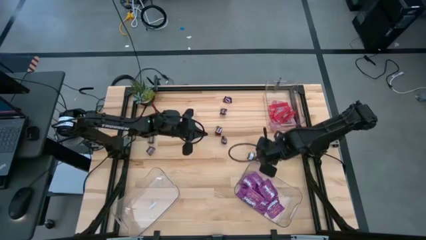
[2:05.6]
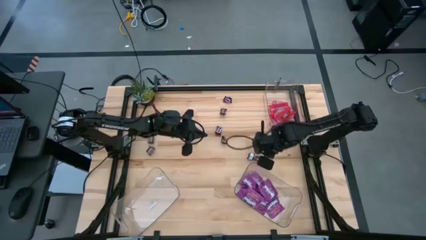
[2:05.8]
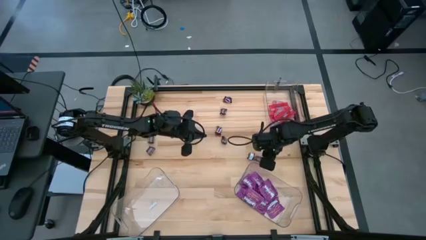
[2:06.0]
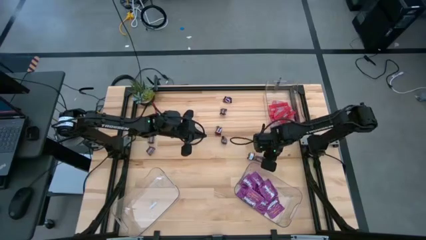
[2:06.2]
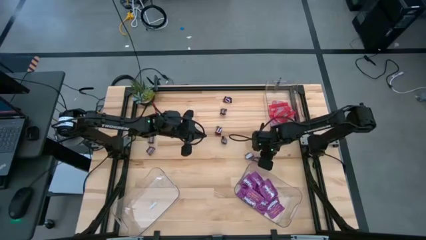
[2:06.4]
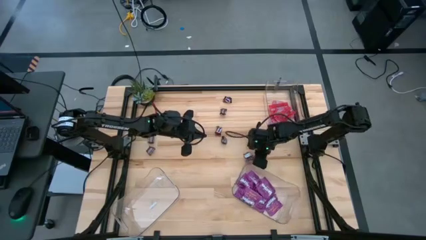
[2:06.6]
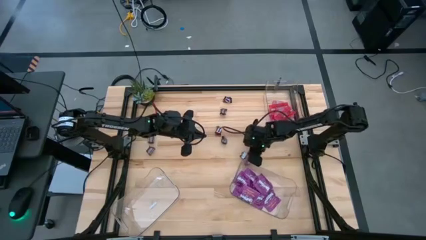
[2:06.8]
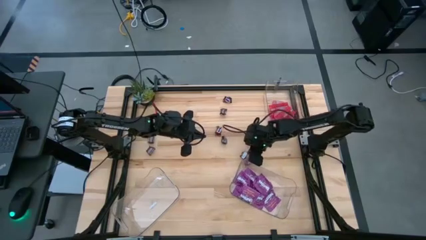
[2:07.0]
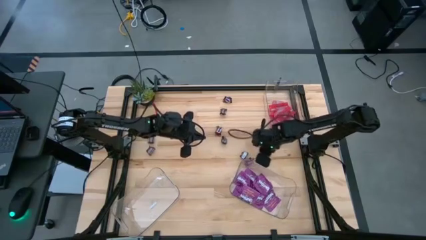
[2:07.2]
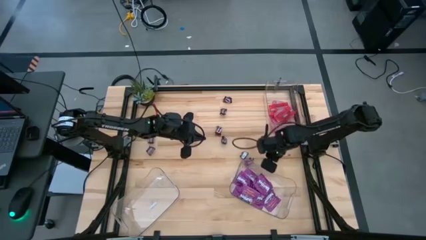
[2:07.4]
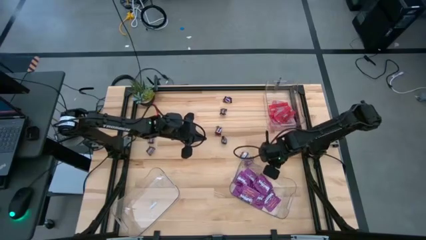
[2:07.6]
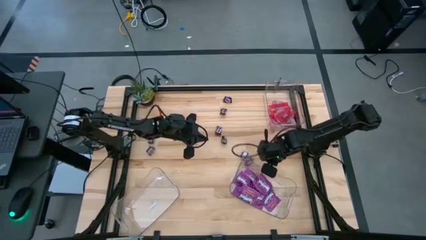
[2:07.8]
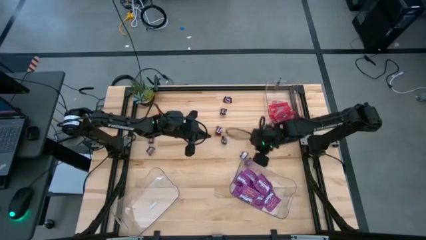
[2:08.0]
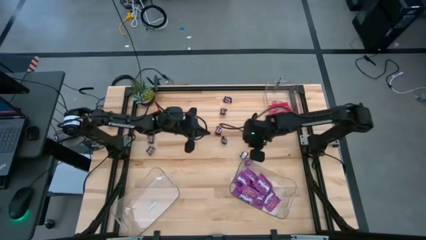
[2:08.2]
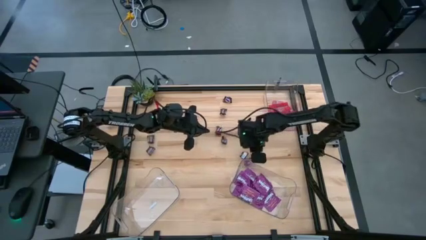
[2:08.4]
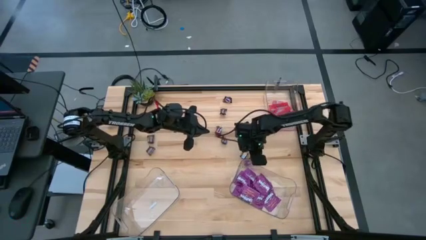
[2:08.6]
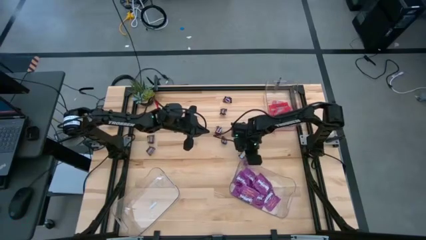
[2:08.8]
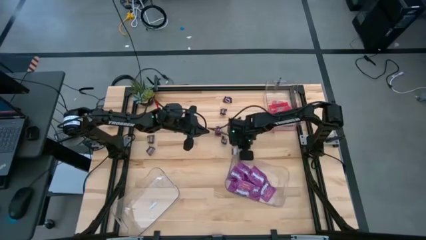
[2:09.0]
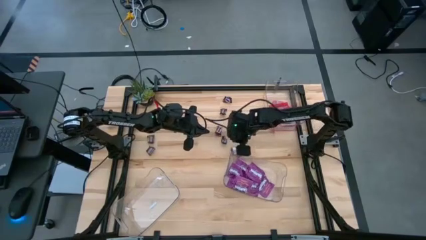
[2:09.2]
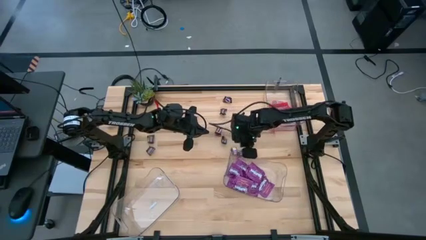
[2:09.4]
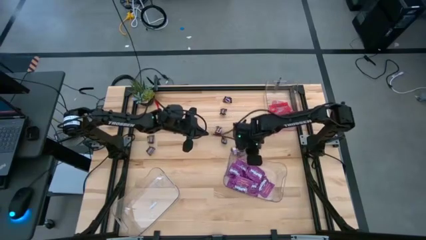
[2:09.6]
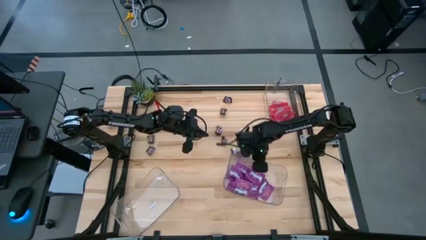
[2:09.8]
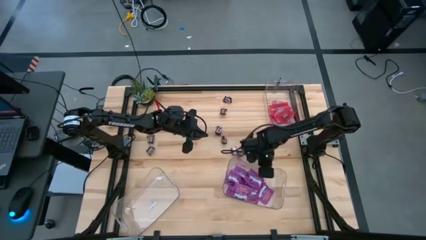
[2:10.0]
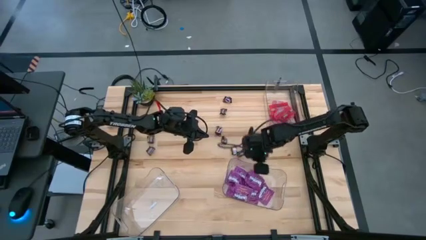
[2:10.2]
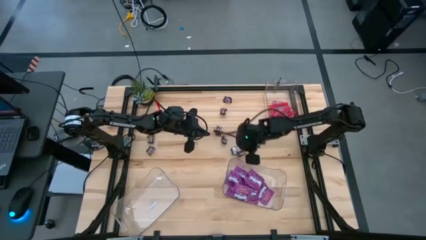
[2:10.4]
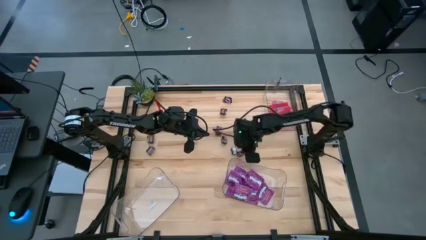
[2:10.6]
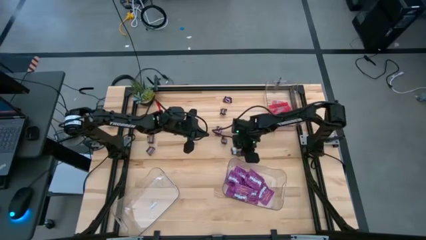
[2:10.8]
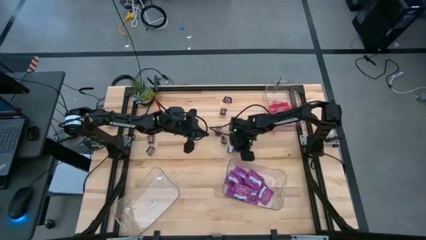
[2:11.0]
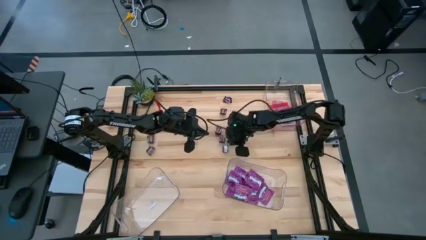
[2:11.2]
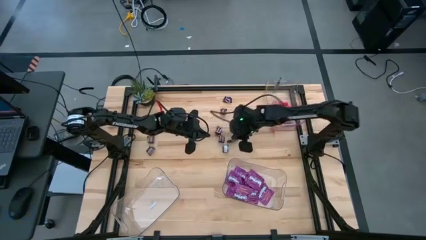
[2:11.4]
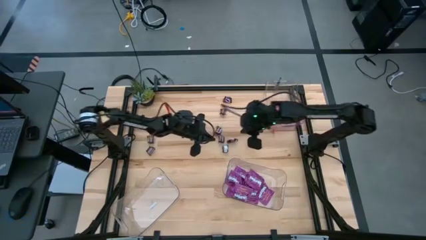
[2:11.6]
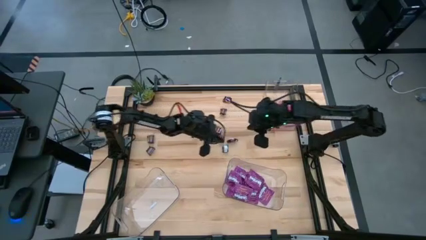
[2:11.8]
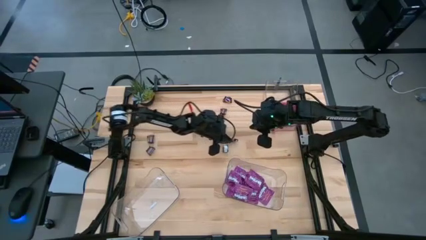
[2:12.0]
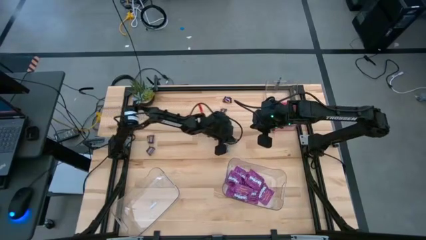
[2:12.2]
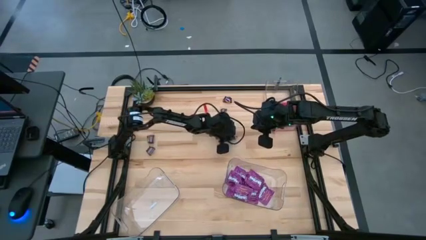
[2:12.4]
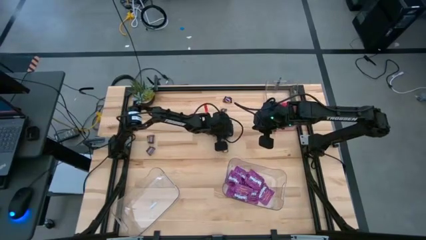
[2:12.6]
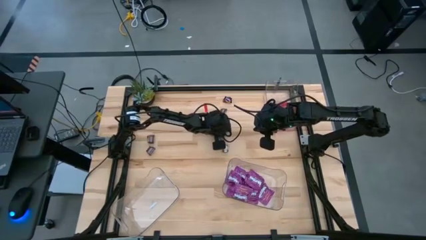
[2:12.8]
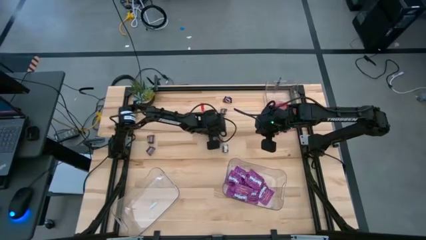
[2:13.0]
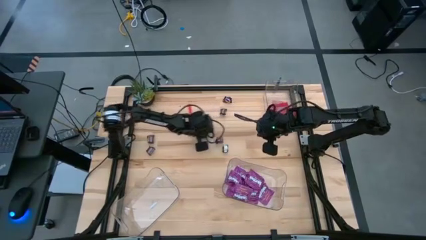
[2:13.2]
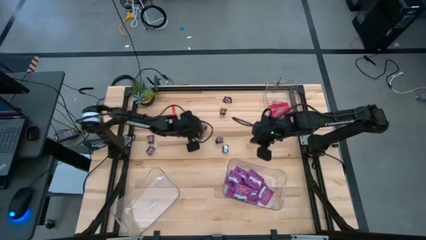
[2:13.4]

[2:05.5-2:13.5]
Task: Sort candy
Move the brown candies closer to the center

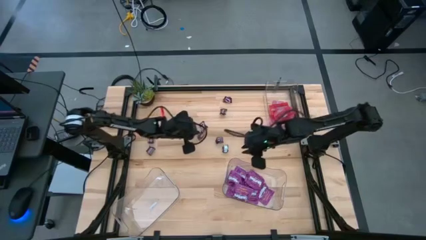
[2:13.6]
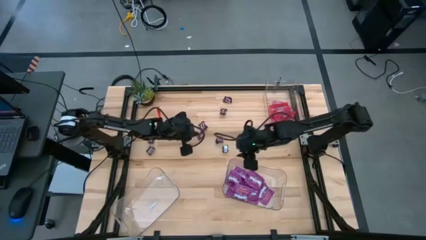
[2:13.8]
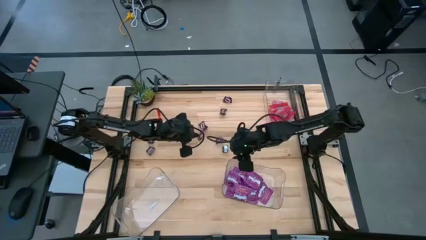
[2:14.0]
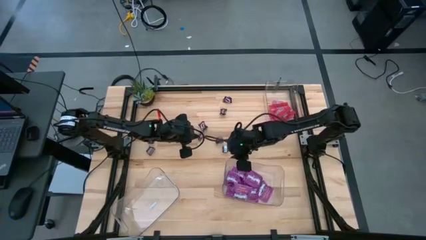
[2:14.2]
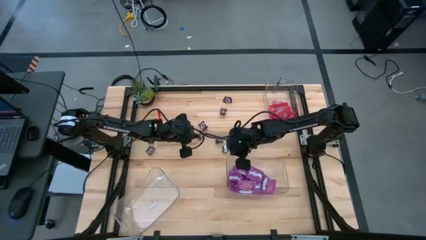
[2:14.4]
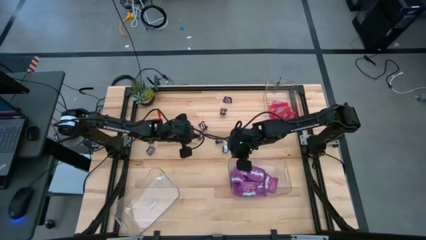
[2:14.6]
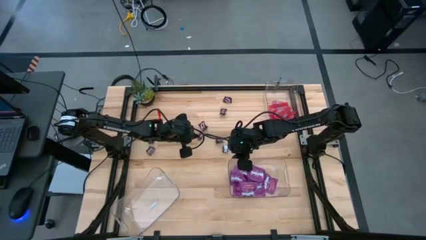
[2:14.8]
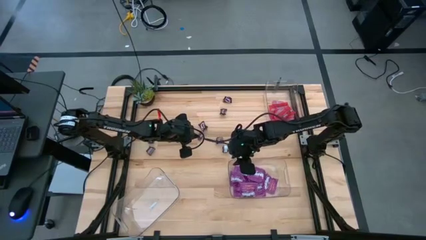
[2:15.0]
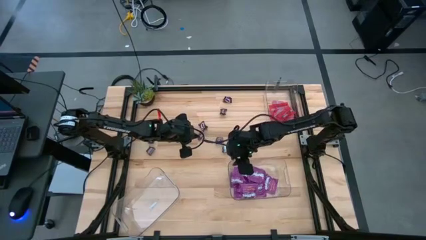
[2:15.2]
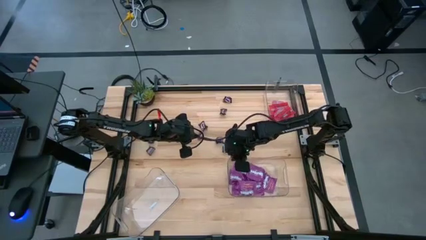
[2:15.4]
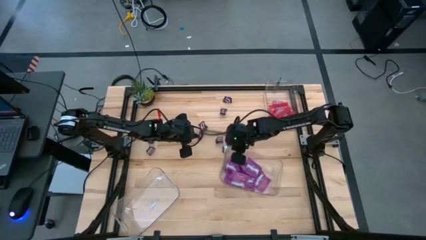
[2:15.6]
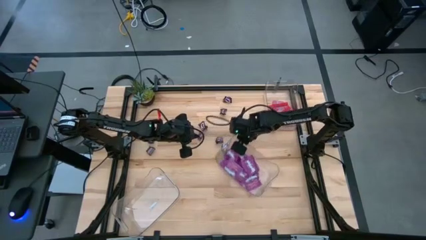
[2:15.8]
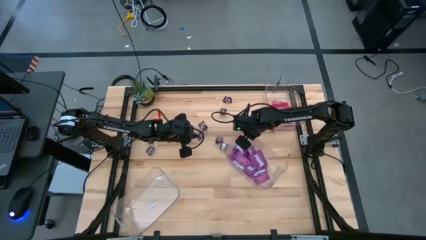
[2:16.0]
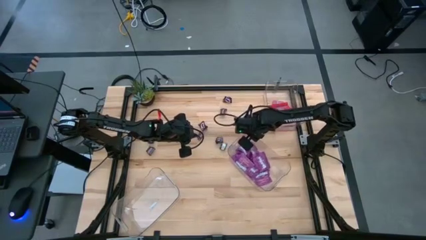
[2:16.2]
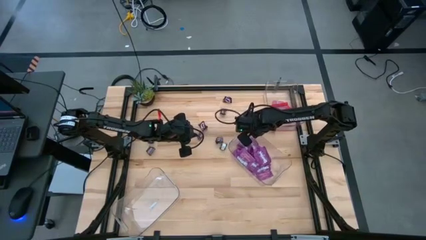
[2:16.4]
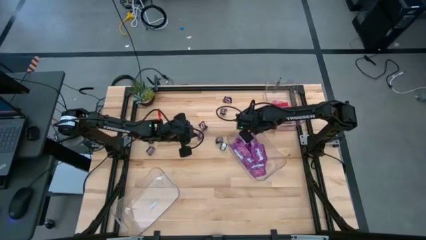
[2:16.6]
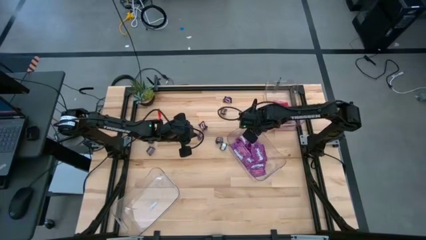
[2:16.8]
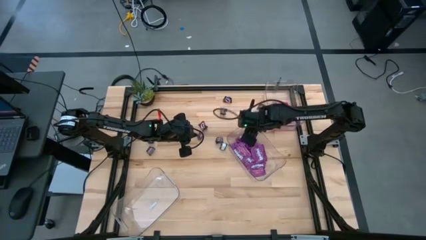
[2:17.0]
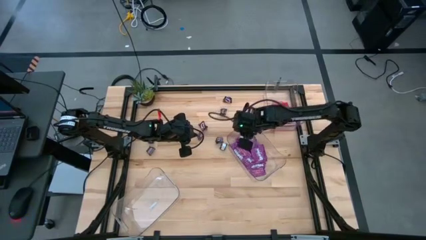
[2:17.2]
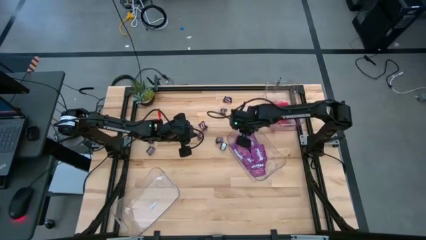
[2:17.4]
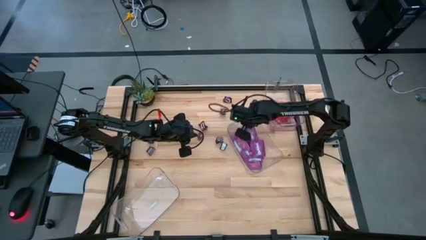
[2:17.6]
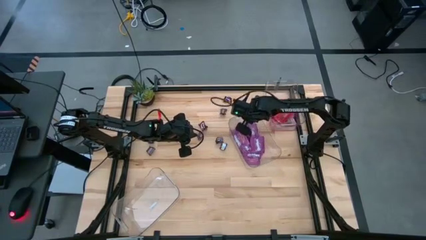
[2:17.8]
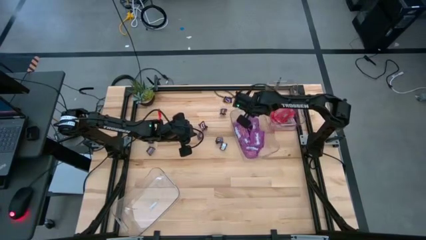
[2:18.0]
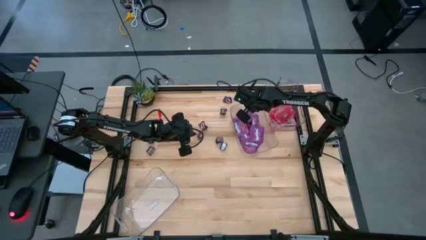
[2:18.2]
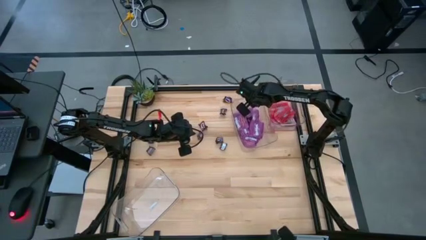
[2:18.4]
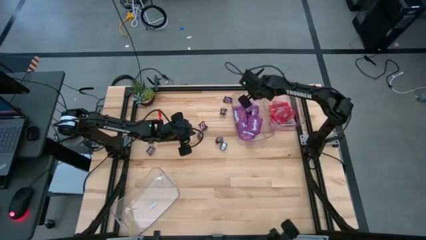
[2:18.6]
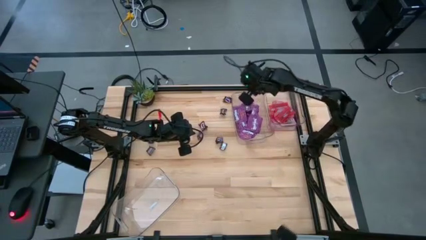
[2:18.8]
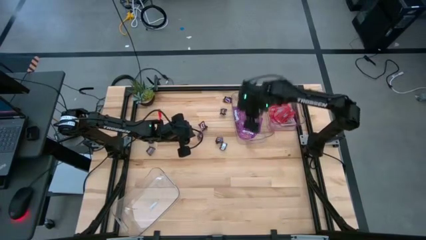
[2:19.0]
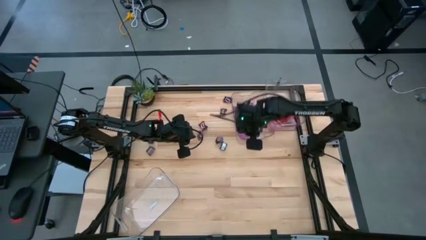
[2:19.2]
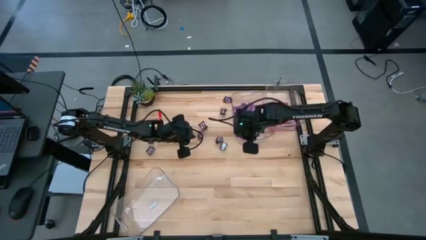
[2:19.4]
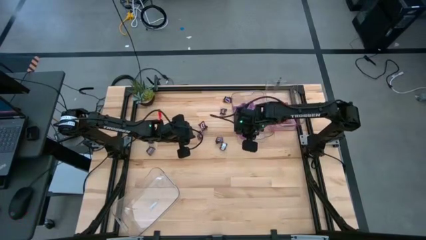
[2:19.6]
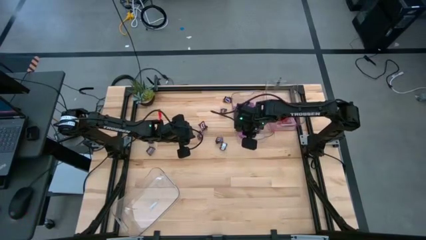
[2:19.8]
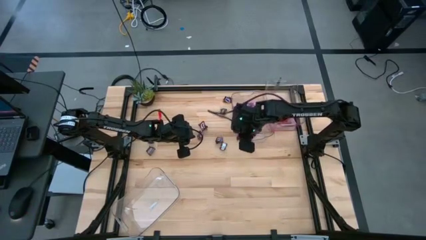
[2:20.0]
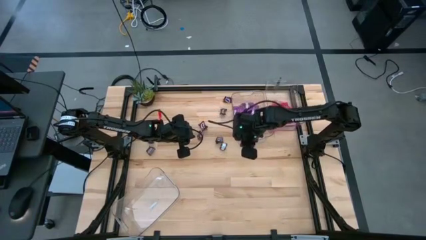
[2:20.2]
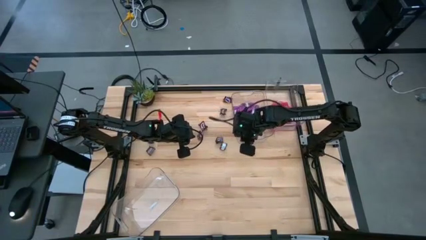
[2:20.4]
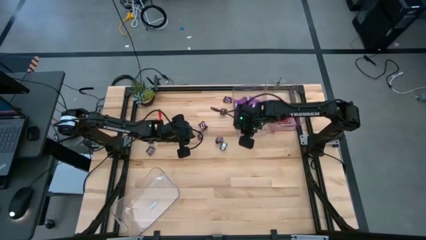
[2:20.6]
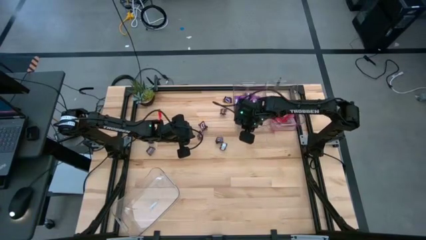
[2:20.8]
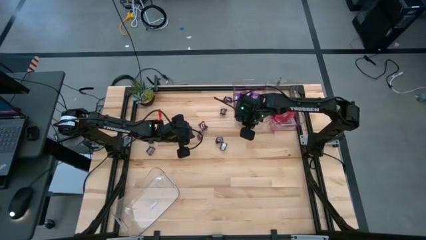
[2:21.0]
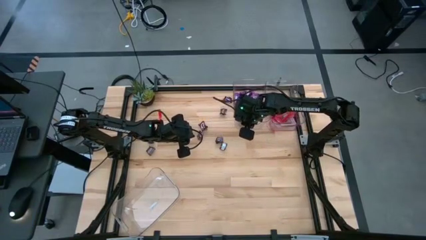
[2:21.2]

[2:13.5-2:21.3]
Move the bottom right transparent bin beside the top right transparent bin

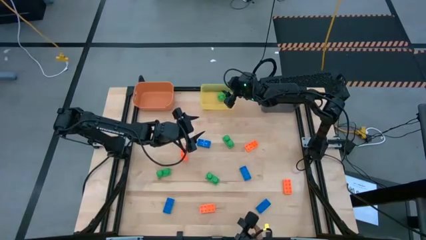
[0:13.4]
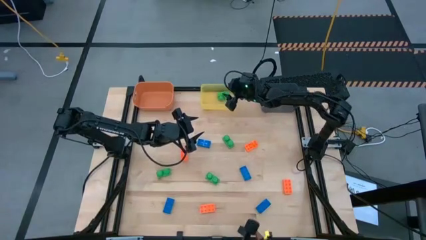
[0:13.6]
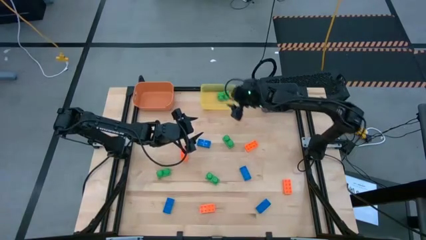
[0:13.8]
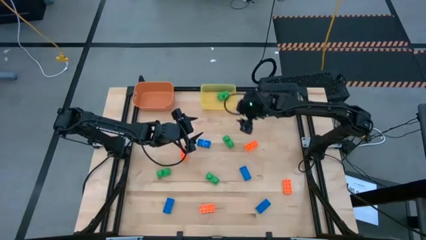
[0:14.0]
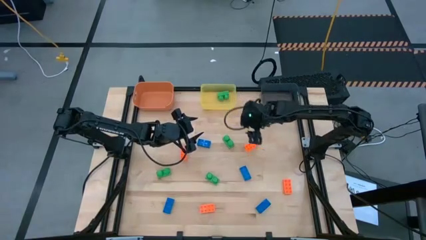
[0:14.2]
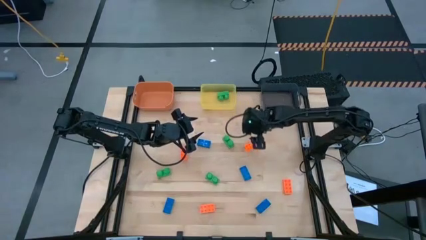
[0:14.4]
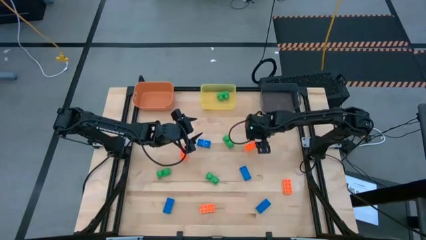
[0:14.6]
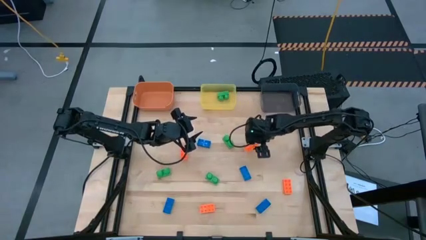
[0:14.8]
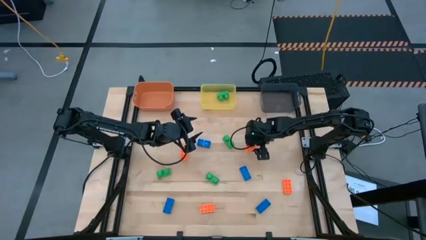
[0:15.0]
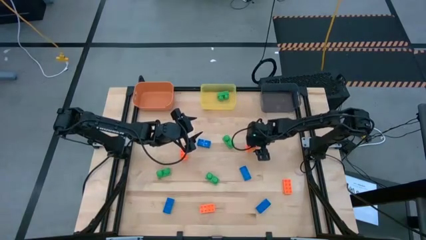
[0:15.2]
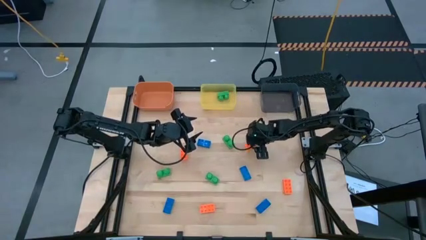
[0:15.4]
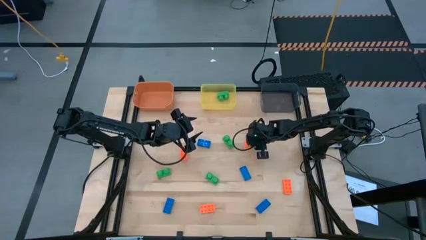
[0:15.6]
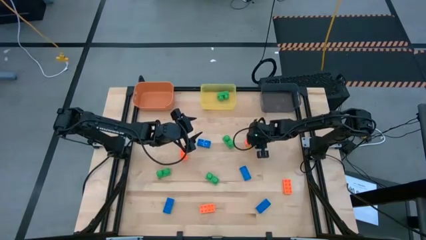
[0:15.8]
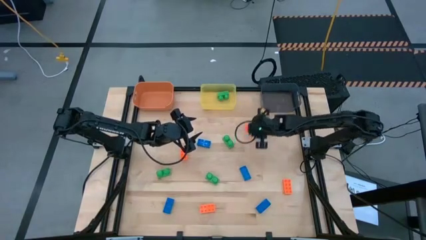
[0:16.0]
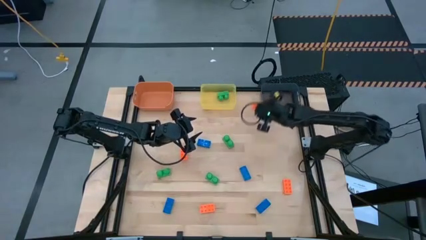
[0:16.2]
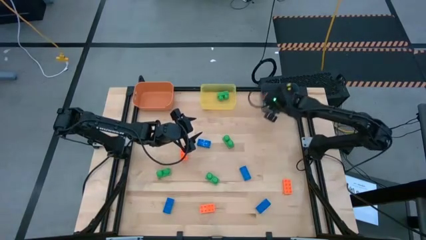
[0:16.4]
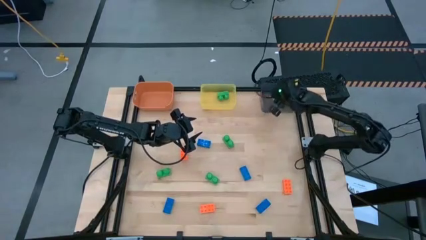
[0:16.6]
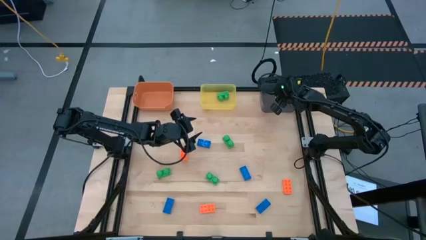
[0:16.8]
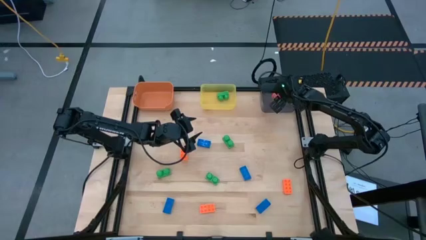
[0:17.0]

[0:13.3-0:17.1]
Task: Sort & place blocks by color
Put the orange game piece into the black bin
